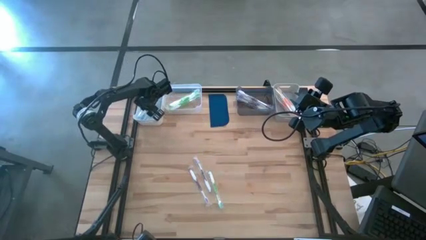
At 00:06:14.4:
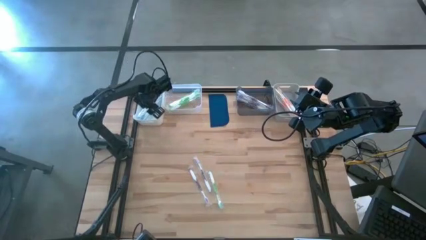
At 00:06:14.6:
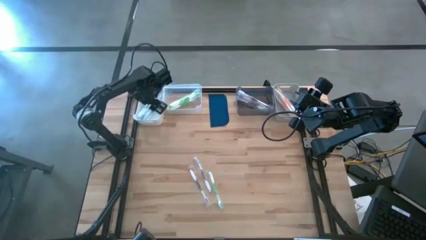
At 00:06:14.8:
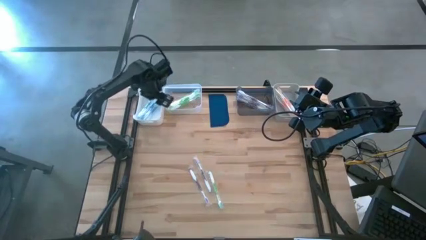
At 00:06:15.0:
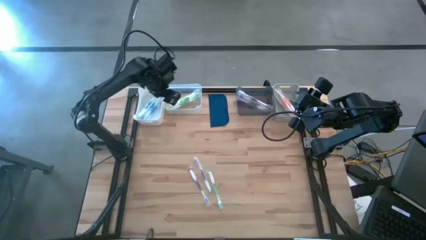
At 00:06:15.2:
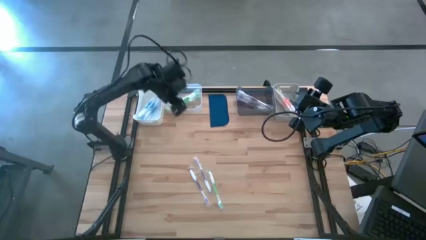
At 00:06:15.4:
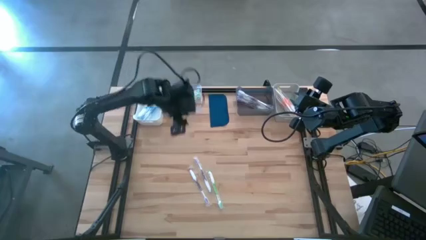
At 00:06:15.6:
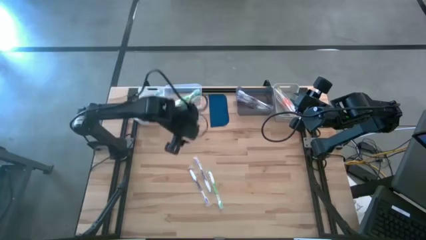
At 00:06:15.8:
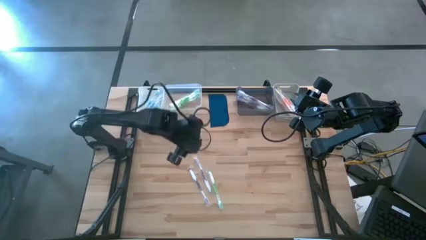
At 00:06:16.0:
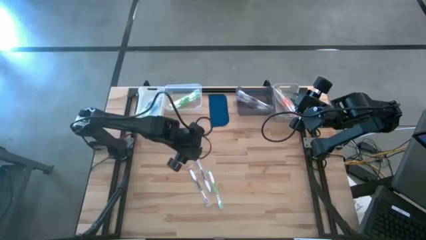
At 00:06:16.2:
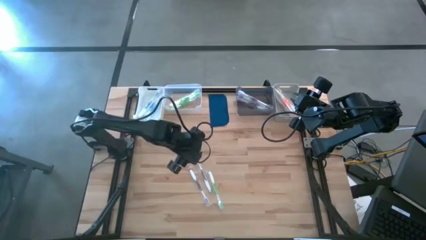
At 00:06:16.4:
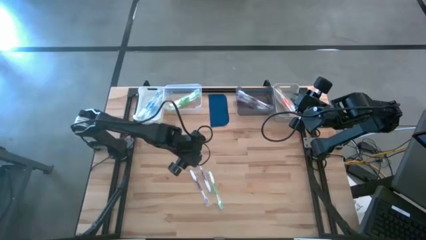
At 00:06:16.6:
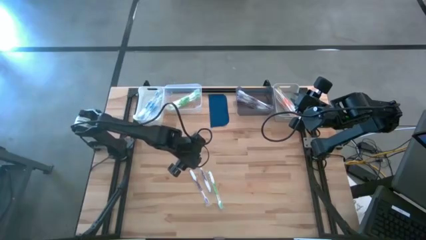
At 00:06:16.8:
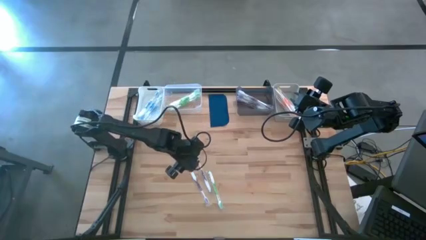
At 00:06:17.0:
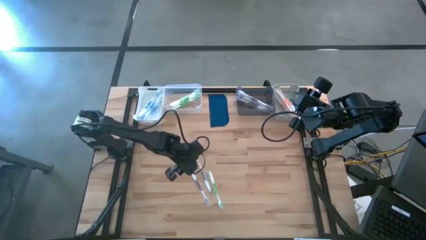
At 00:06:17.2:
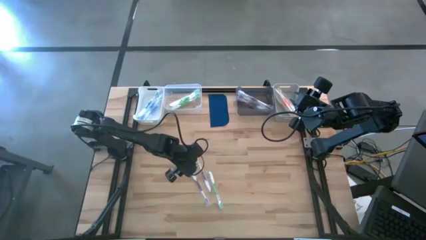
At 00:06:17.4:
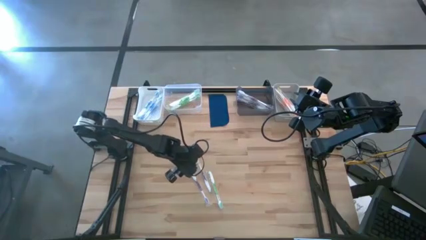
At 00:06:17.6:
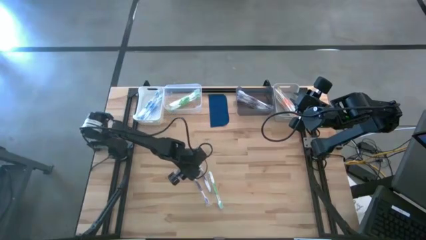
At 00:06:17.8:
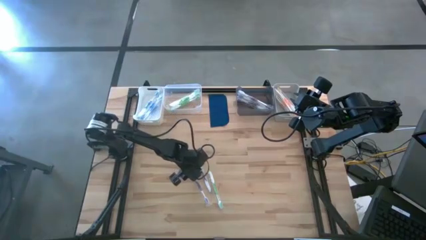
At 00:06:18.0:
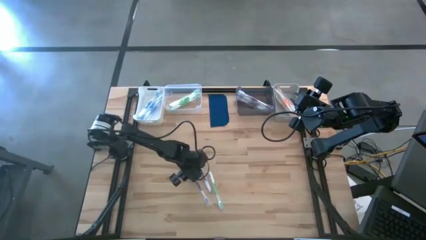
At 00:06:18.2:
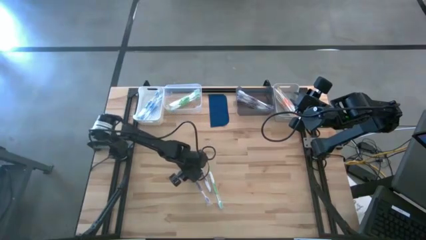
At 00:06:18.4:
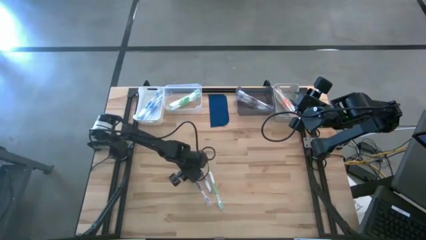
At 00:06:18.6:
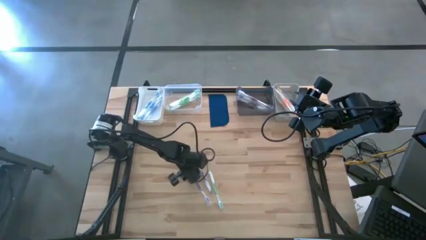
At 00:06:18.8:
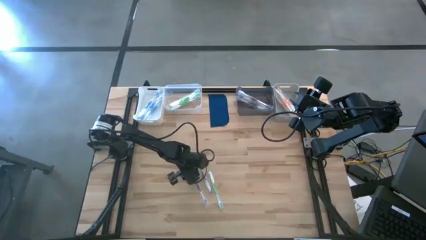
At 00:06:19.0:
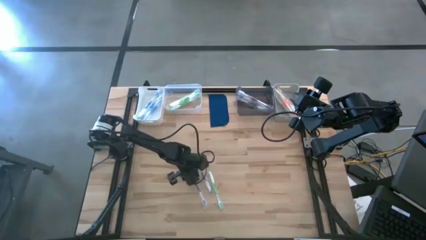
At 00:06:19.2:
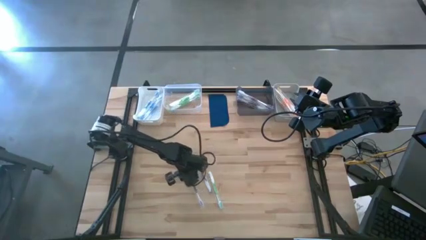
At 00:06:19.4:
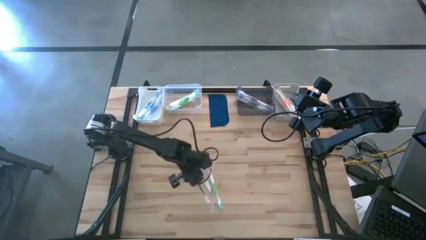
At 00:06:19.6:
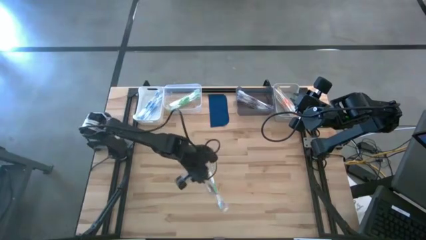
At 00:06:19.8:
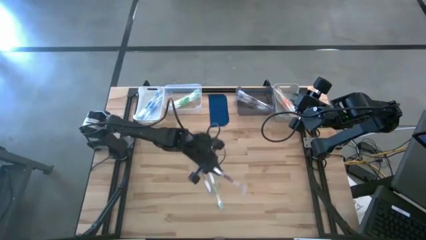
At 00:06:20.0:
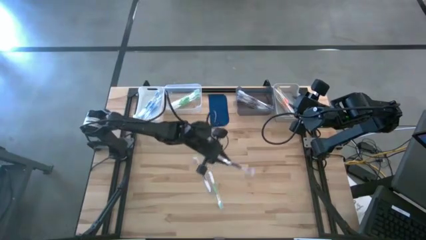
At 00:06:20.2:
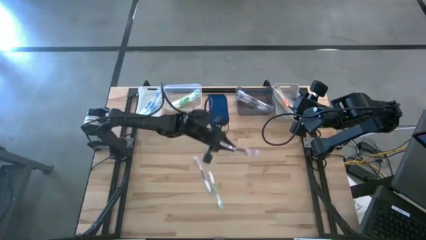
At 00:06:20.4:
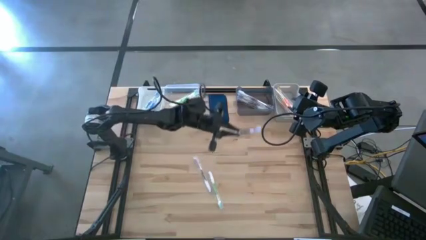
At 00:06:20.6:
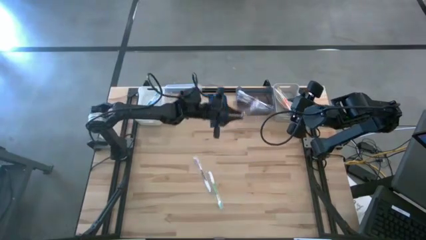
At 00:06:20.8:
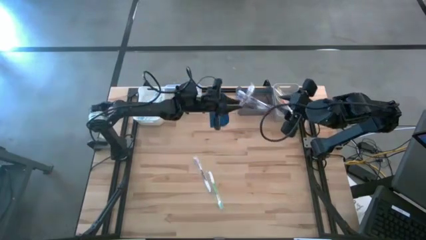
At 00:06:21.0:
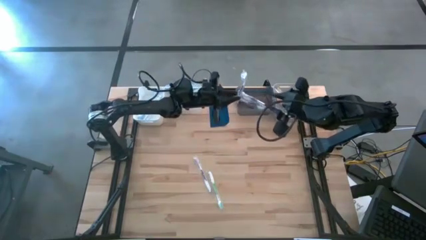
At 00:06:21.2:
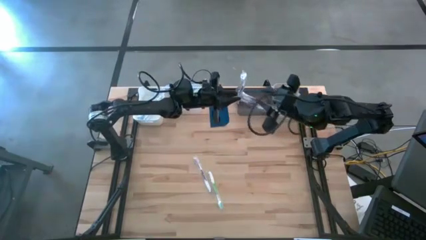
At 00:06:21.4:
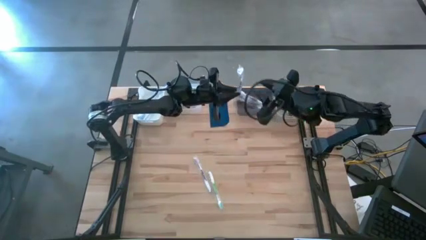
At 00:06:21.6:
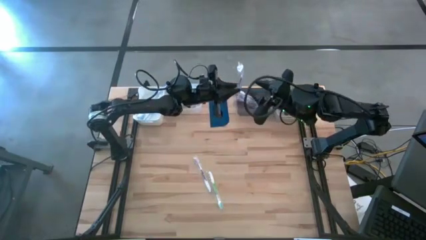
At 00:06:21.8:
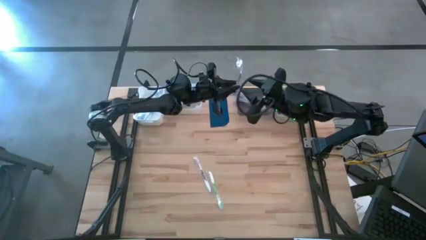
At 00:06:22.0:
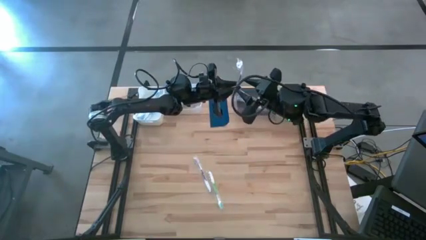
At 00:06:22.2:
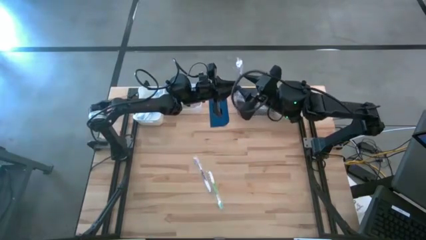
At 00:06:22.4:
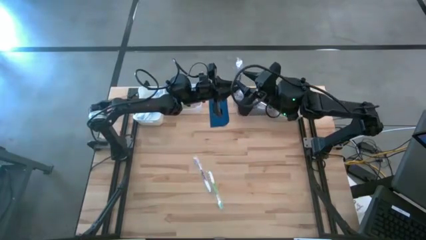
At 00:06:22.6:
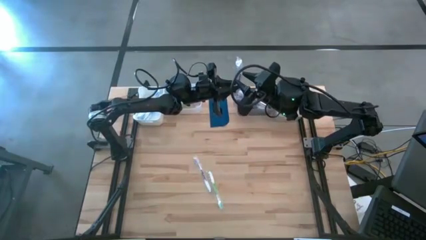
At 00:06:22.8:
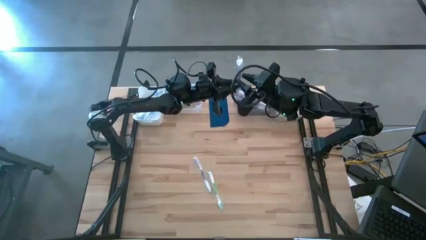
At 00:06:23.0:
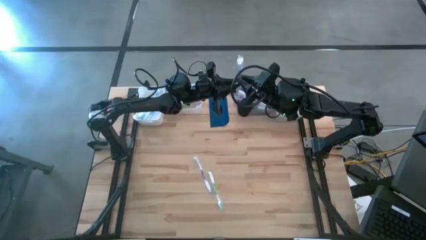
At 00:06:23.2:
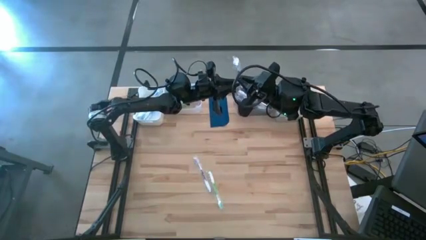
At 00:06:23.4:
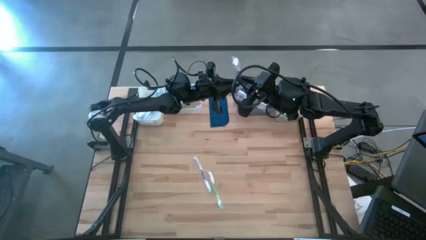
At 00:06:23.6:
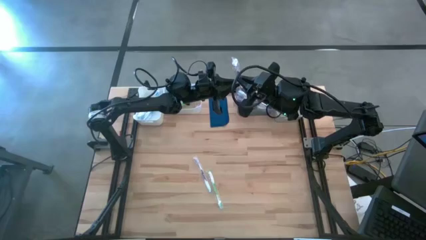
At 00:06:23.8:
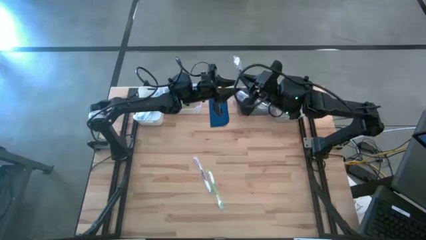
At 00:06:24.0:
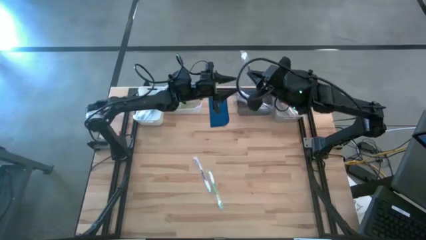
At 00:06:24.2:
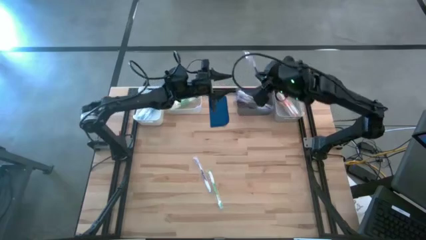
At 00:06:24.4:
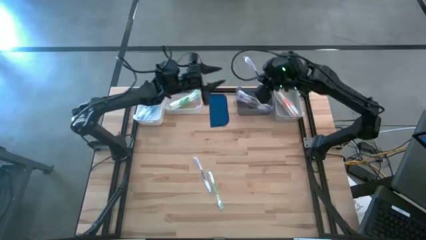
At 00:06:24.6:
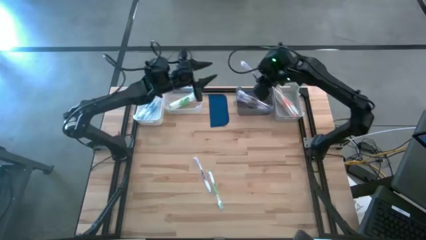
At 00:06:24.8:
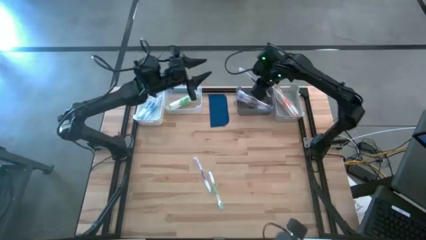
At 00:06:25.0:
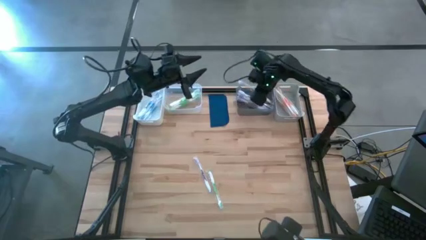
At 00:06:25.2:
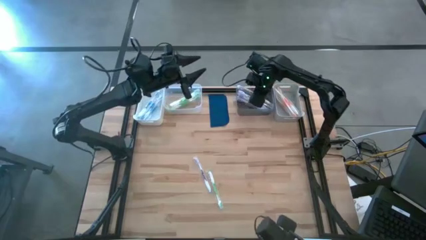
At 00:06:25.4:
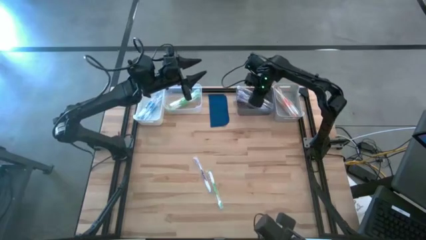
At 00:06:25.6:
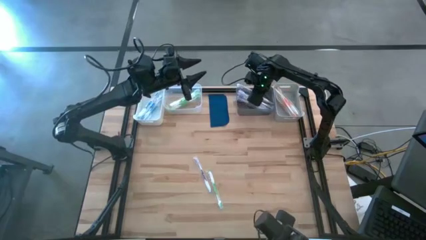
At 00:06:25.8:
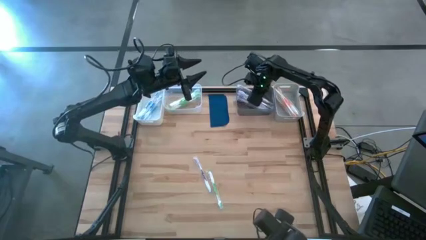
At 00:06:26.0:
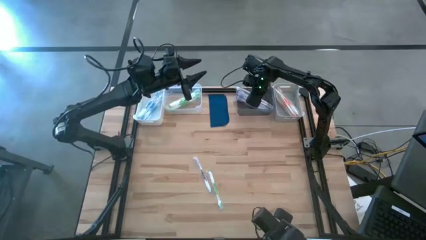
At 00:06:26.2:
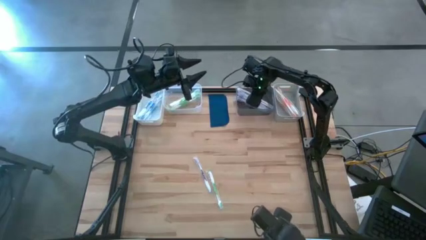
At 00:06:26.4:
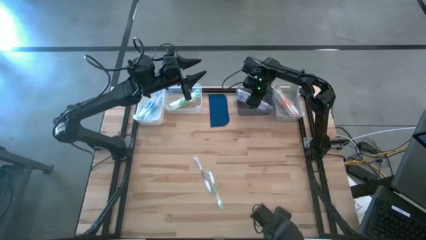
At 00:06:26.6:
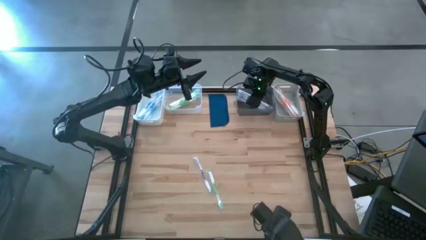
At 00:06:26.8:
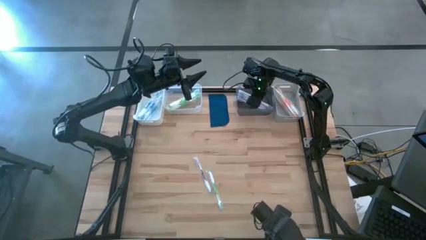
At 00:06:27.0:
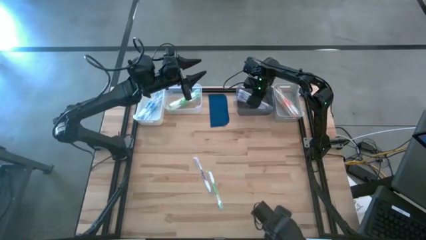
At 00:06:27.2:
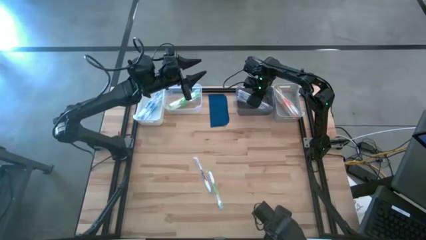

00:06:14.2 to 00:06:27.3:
Task: Pick & Place Toothbrushes
Put the purple toothbrush into the black bin

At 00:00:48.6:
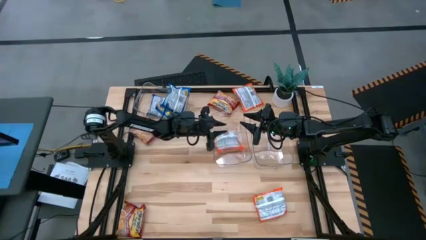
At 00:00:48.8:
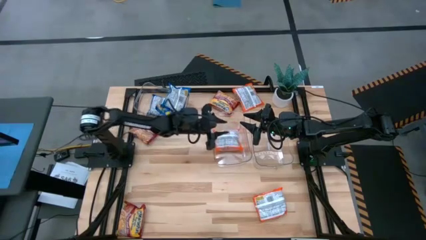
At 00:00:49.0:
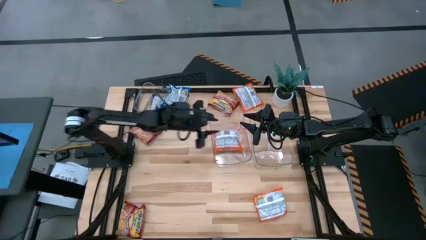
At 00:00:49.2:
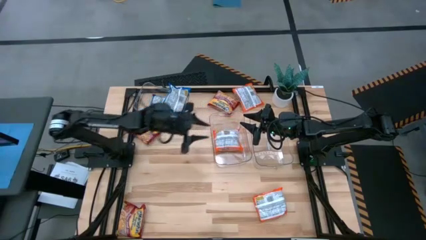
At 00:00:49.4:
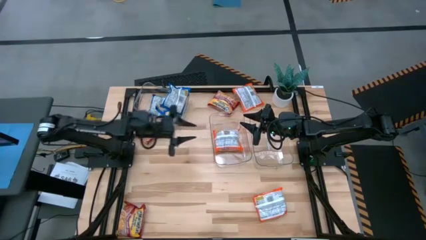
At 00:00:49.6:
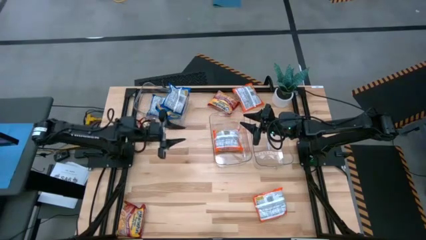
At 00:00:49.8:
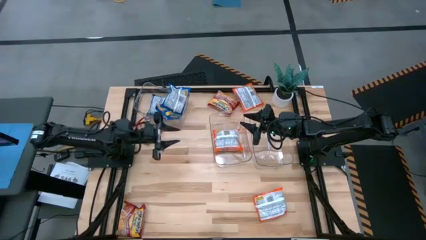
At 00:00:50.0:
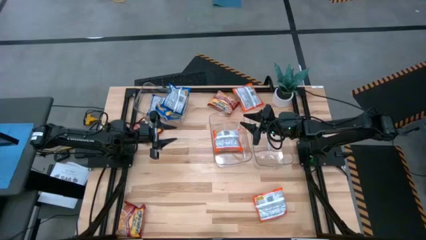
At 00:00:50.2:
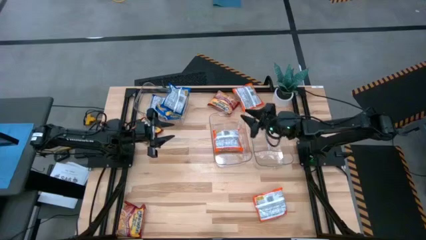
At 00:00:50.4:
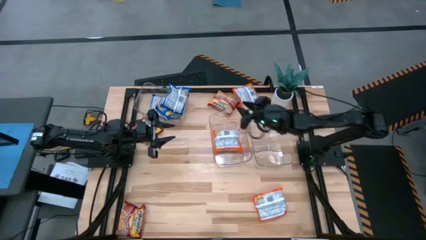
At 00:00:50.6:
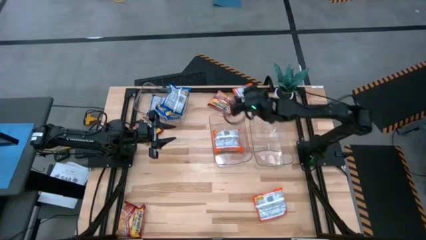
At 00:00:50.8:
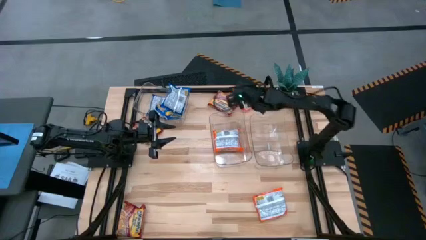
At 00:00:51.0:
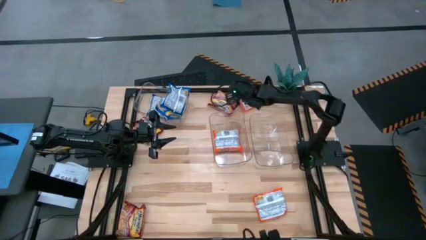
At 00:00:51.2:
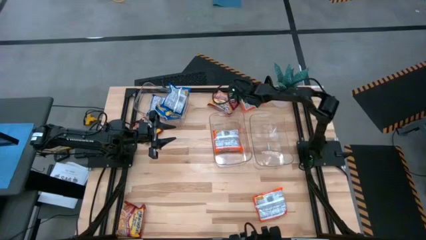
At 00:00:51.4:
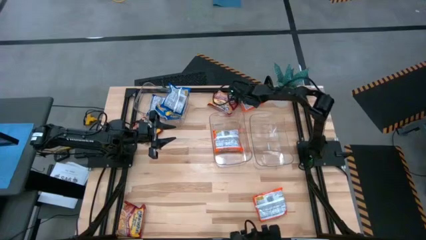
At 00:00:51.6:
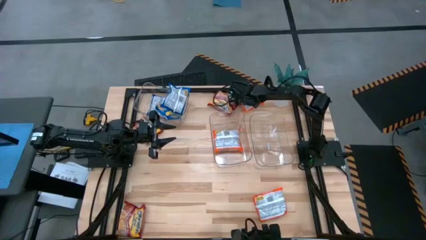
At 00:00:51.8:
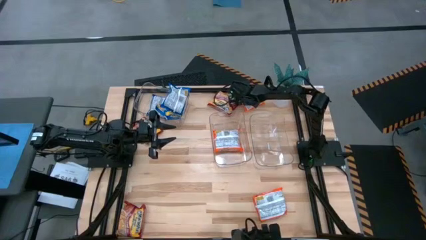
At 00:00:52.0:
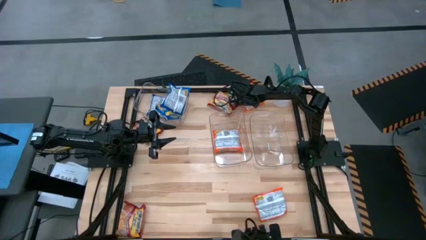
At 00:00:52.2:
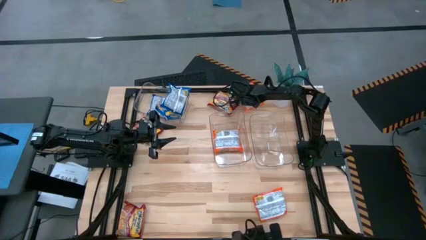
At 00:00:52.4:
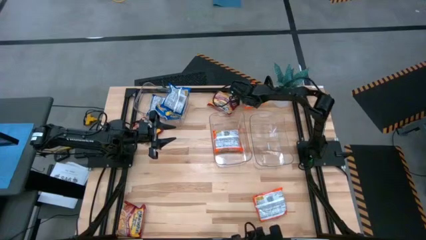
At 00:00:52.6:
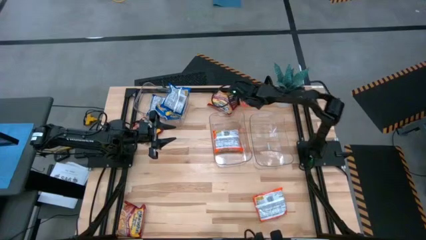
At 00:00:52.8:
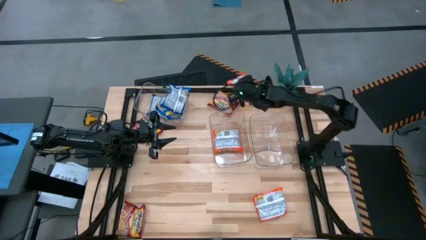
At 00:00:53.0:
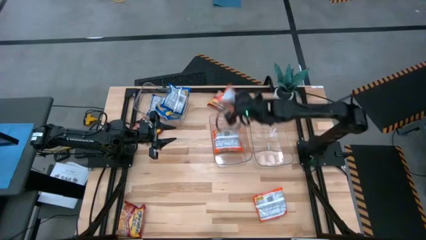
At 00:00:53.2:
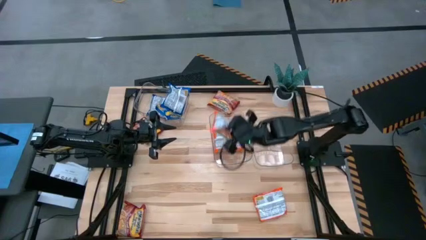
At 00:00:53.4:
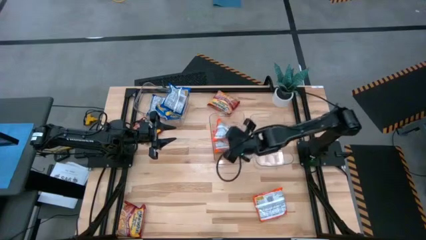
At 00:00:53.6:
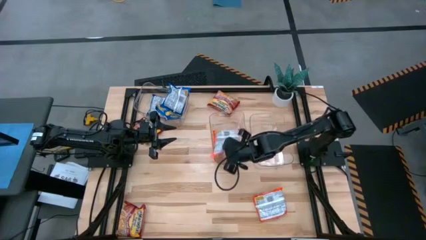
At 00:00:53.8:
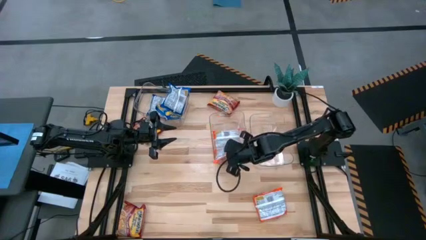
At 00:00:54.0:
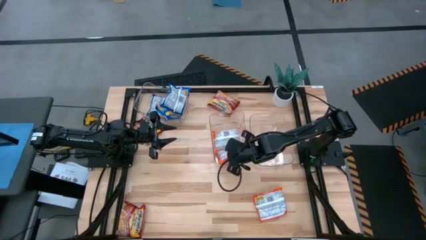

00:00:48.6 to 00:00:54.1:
Task: Sort Maruchan noodles
Put the top orange noodle pack into the bottom center transparent bin
